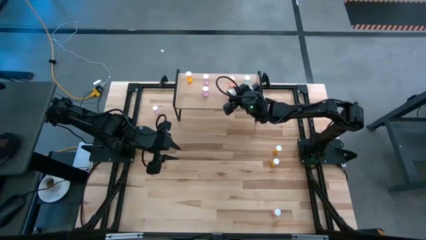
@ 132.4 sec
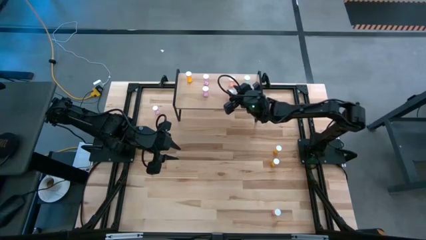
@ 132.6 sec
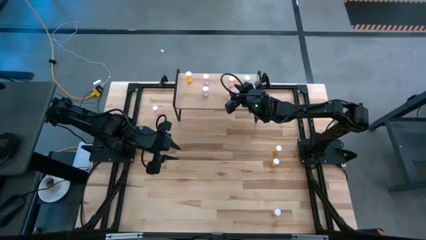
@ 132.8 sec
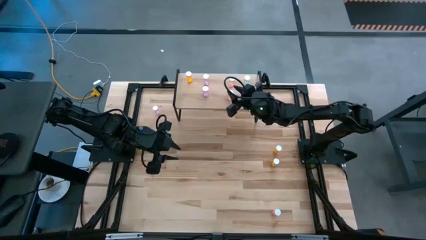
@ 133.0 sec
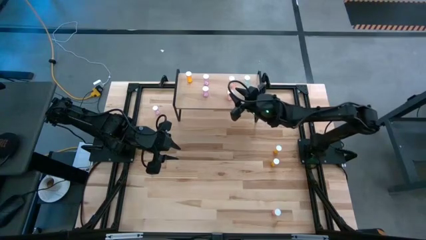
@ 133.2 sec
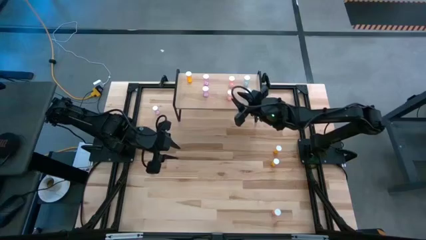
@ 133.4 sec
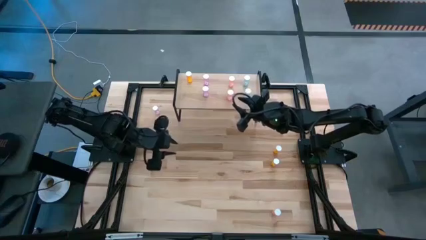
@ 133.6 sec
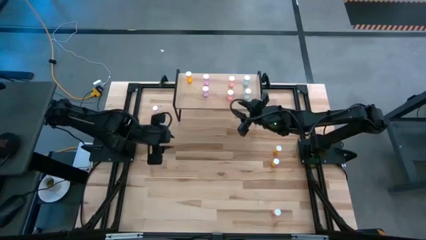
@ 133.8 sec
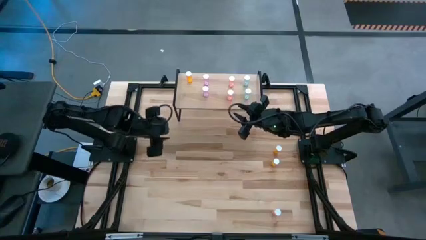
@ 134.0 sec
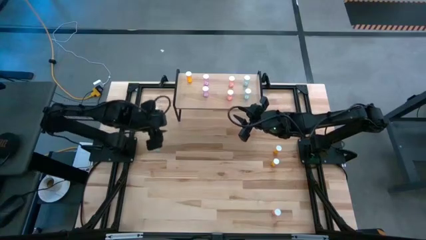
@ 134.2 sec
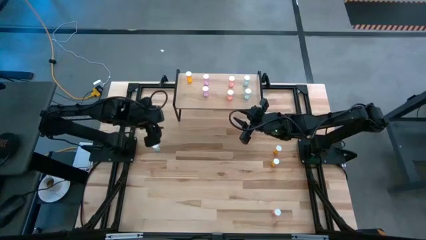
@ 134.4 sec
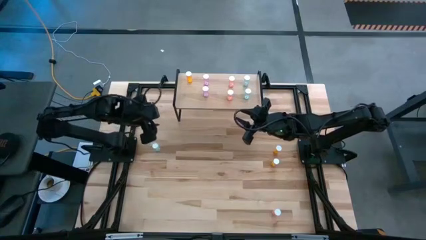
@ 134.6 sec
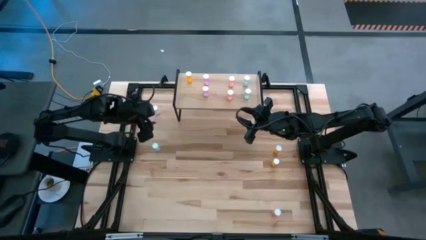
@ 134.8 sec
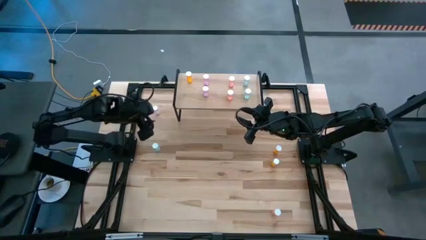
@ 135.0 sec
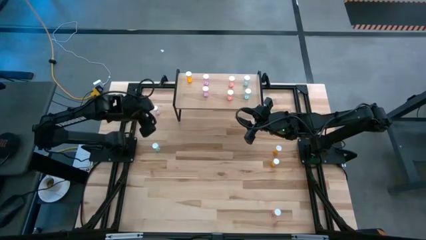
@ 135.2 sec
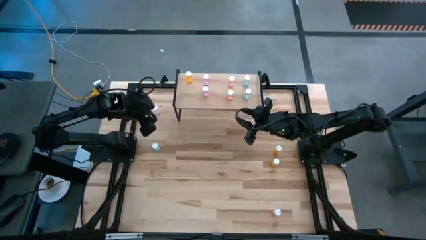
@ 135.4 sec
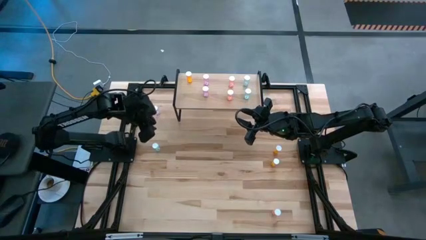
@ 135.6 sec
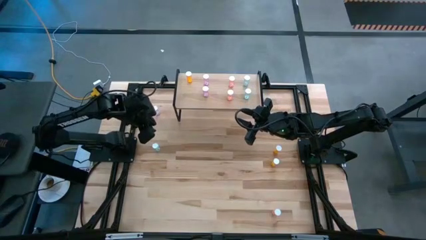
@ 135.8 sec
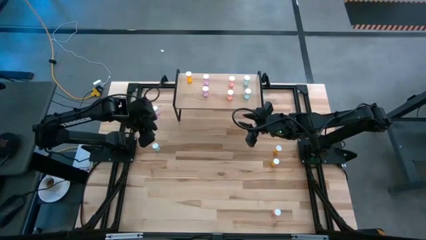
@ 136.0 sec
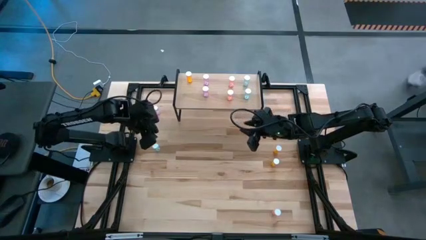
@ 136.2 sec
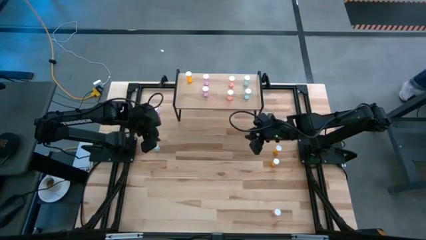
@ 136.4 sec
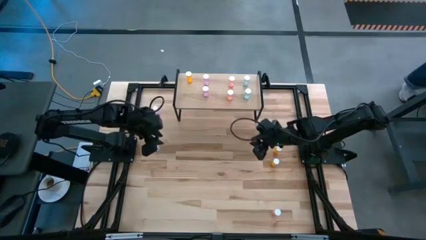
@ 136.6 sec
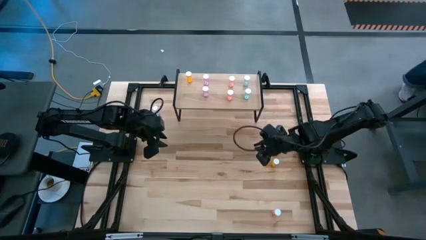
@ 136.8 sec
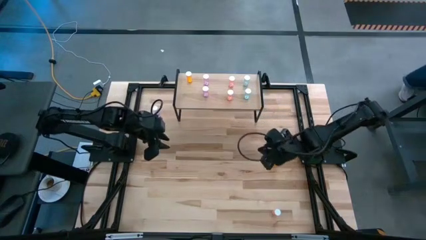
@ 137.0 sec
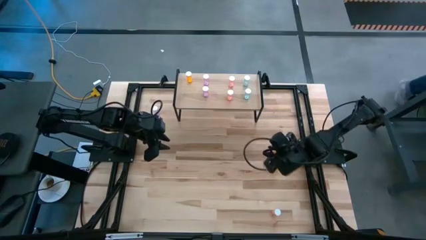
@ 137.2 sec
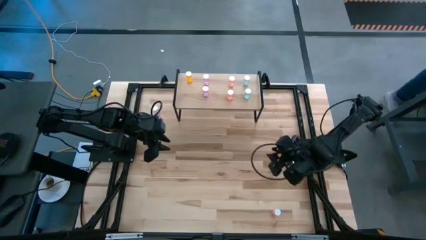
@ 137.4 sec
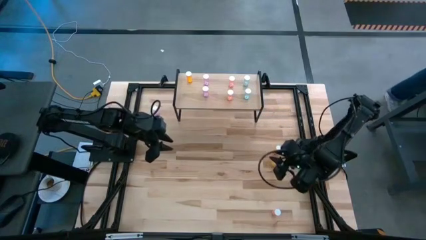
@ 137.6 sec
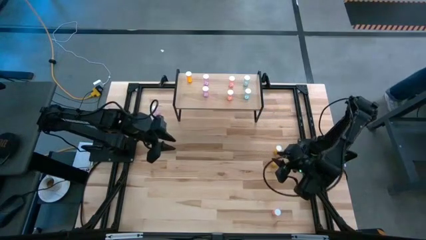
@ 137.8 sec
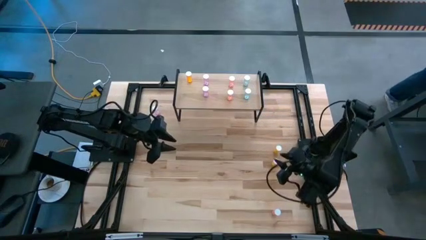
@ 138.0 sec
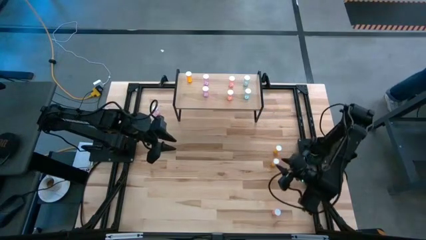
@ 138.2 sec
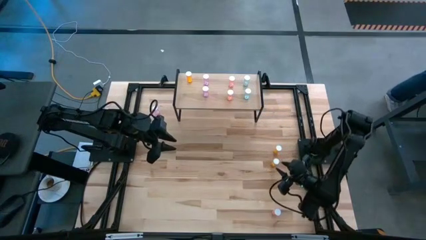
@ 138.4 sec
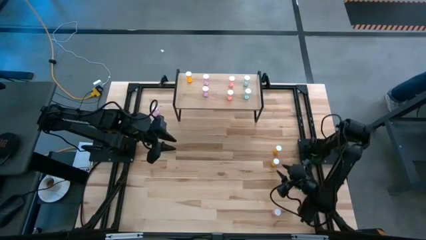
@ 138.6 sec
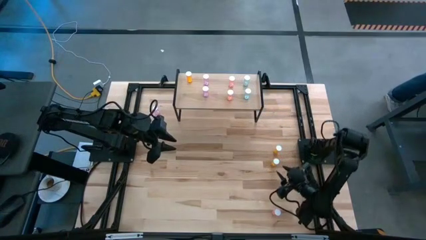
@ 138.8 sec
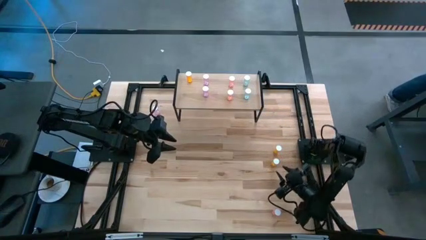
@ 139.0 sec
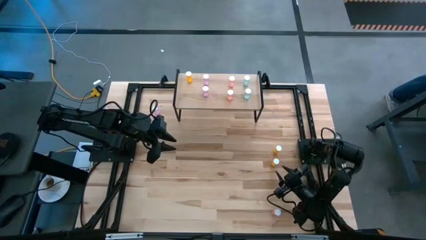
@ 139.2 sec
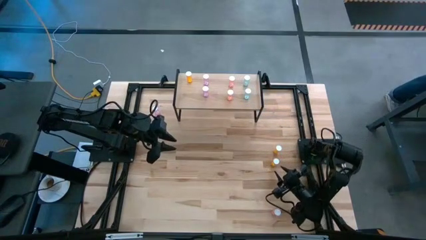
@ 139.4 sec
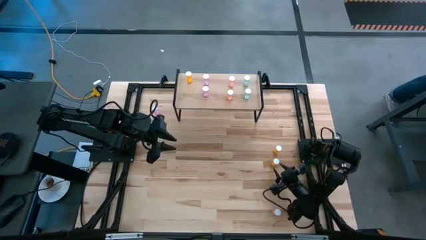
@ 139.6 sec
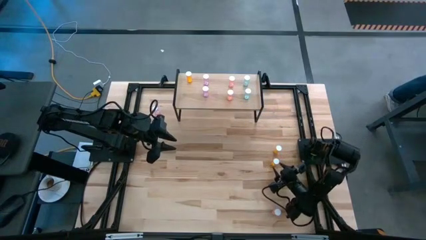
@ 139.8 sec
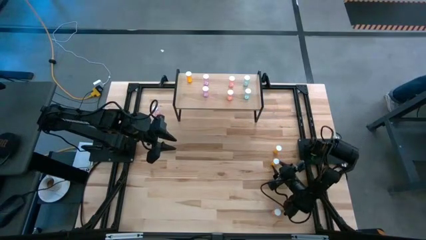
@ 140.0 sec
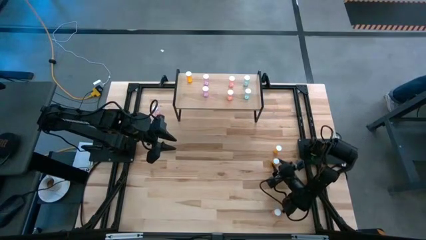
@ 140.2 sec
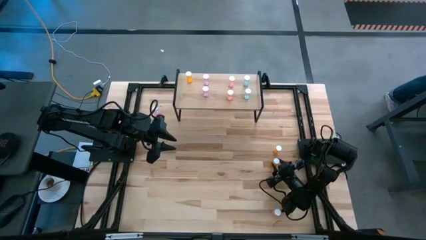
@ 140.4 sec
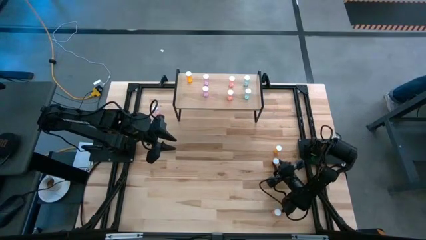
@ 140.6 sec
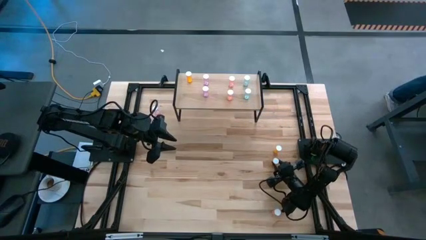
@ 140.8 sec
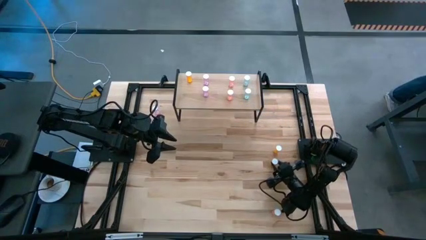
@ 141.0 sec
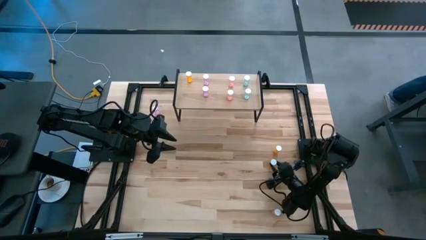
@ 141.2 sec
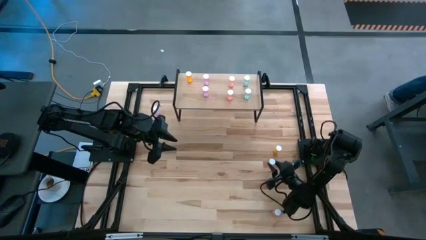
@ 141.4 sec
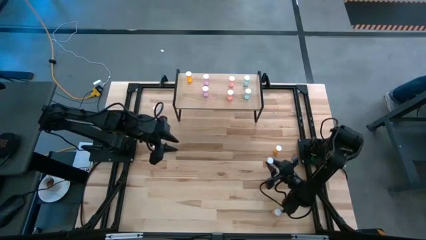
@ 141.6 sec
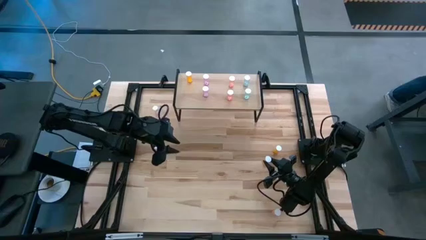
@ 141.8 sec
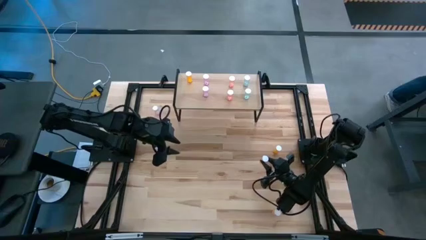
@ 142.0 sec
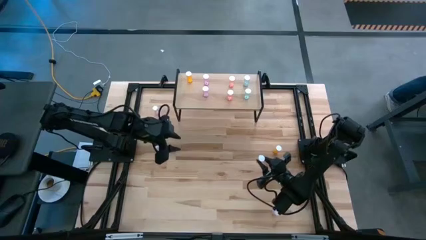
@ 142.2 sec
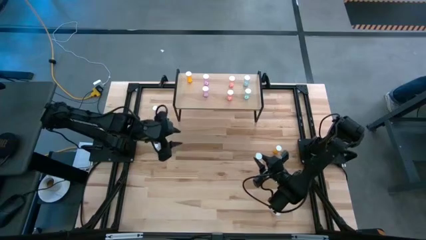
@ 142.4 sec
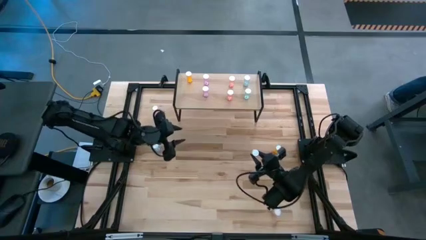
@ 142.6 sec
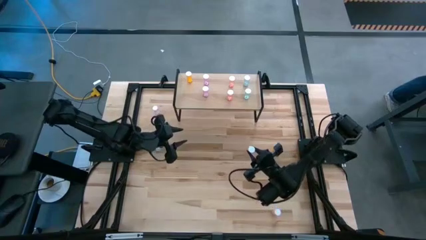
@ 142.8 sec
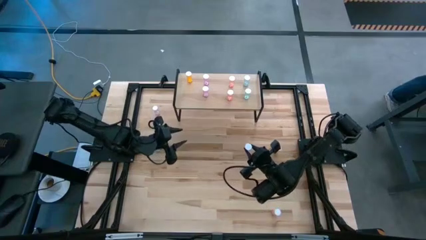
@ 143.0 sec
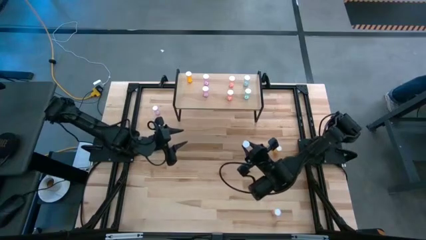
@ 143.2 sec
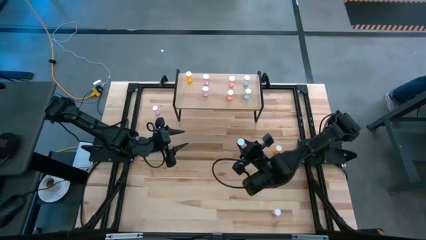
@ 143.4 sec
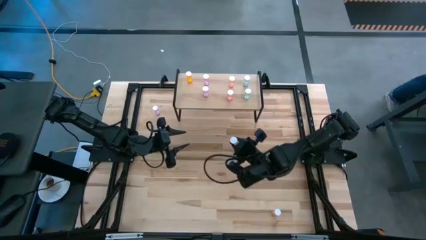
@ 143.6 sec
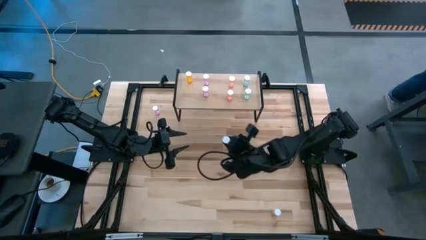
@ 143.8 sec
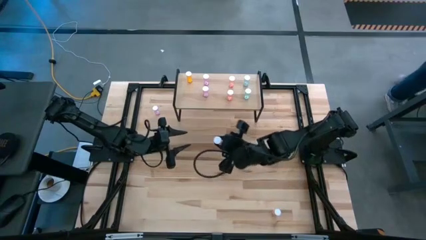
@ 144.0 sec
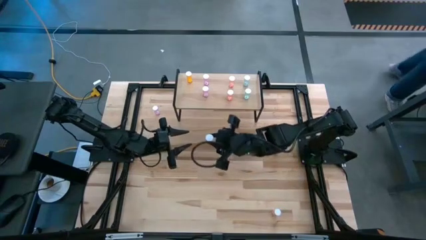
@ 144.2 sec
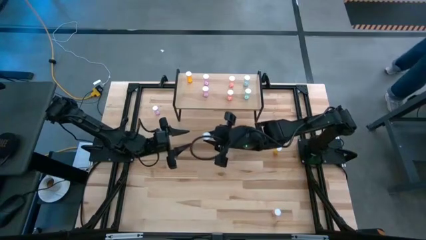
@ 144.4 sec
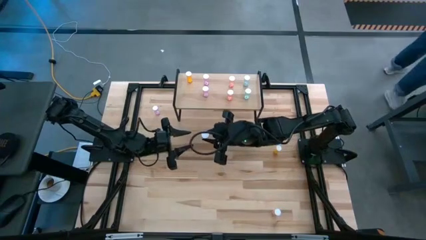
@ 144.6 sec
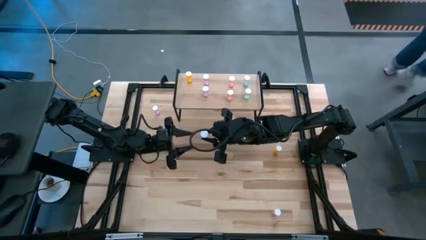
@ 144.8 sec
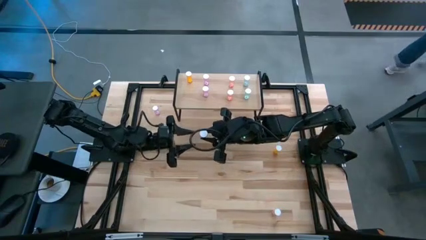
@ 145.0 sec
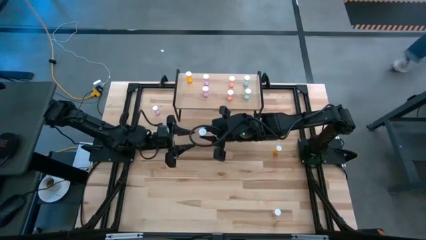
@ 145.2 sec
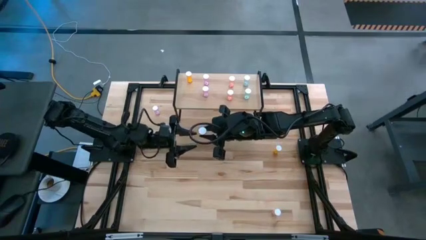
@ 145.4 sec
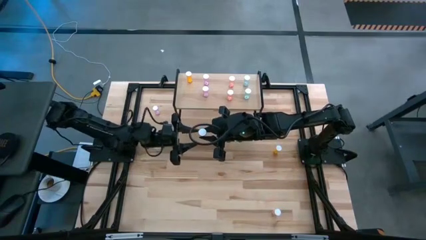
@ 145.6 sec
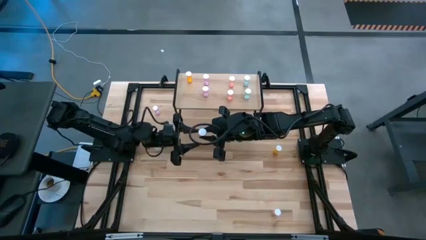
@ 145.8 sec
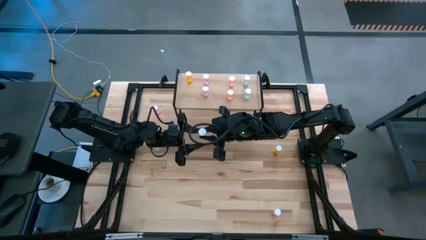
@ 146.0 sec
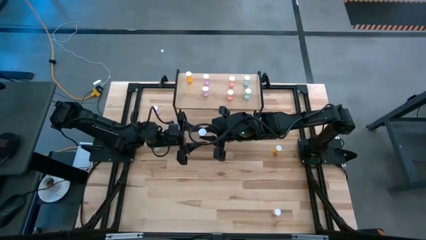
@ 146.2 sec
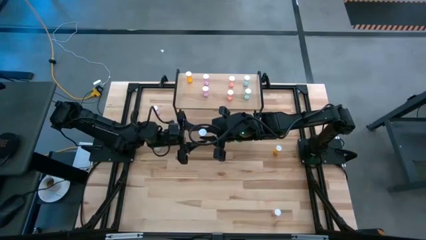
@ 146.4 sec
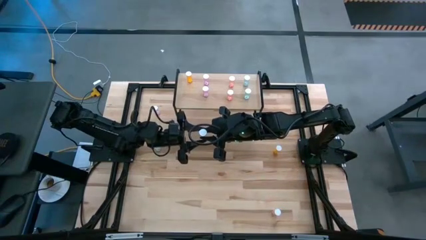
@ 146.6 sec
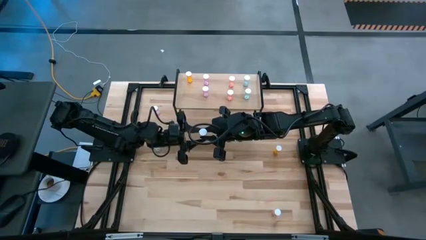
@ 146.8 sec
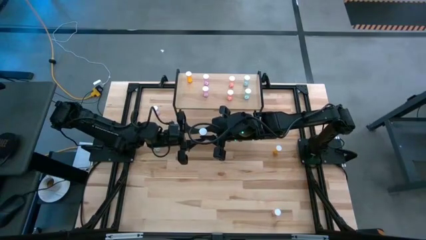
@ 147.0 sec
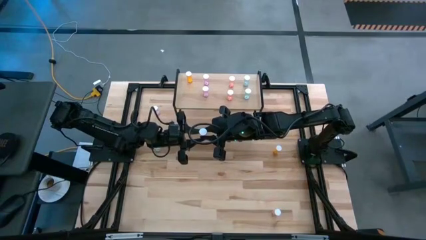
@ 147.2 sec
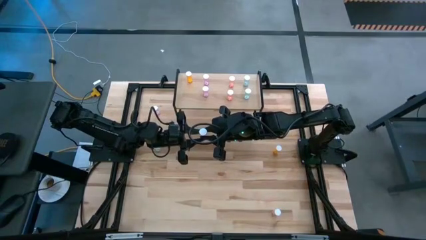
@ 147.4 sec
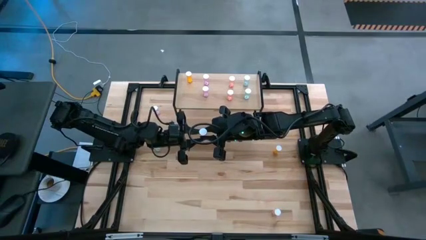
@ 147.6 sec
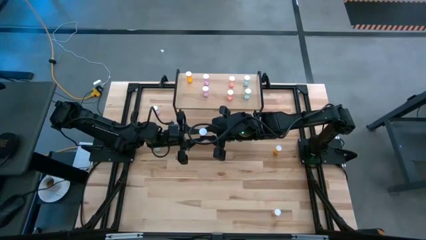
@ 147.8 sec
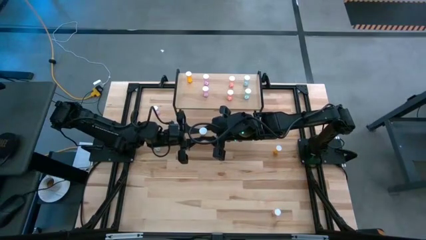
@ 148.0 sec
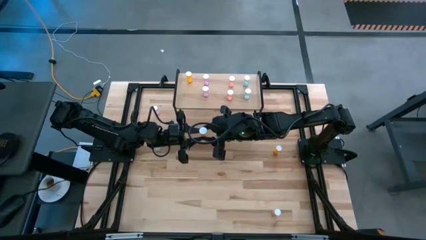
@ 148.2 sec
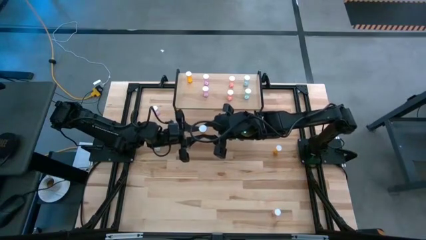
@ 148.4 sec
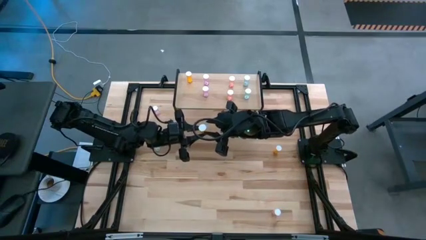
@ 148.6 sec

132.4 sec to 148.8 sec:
Task: Pick and place medicine bottles onto shelf by color
Put the bottom orange pill bottle on the shelf aligned with the other orange pill bottle
